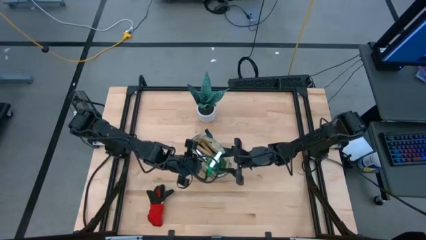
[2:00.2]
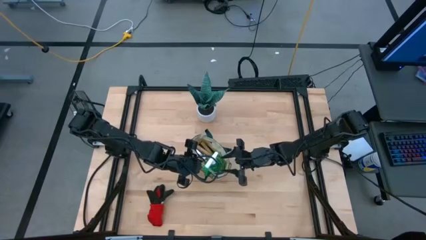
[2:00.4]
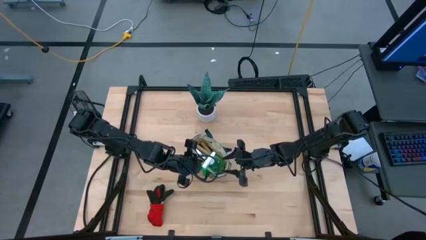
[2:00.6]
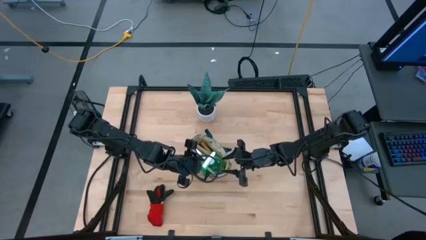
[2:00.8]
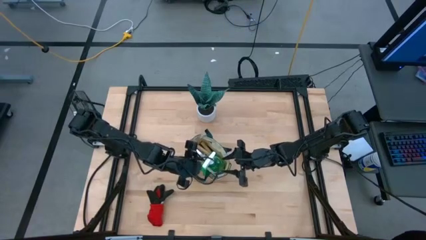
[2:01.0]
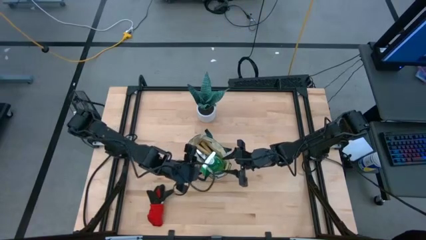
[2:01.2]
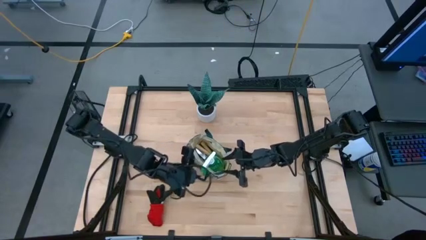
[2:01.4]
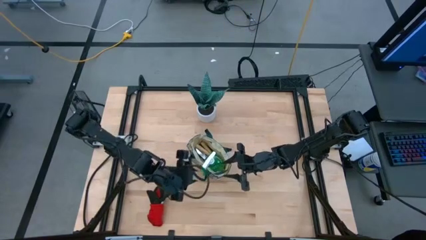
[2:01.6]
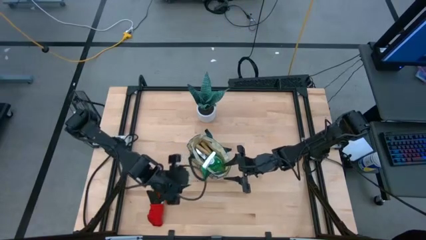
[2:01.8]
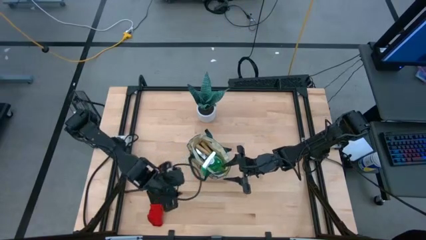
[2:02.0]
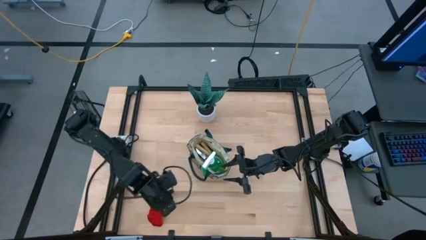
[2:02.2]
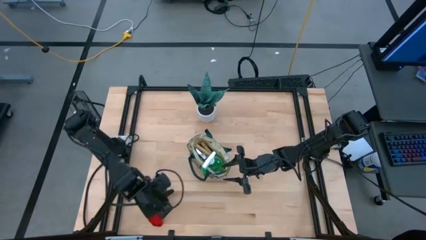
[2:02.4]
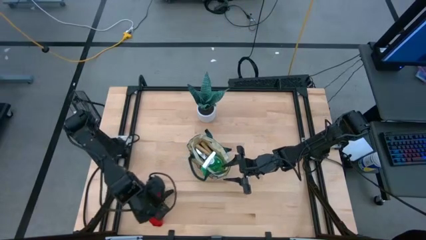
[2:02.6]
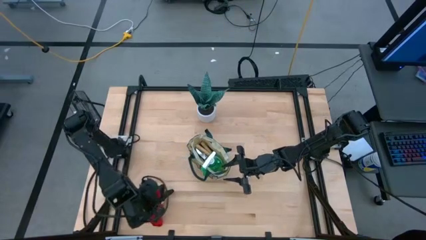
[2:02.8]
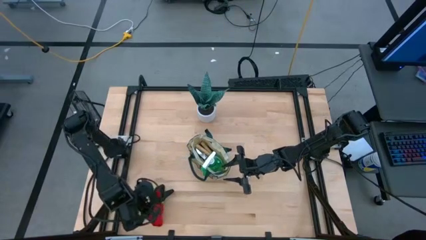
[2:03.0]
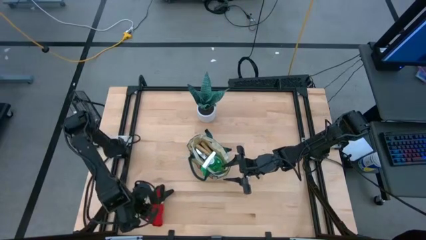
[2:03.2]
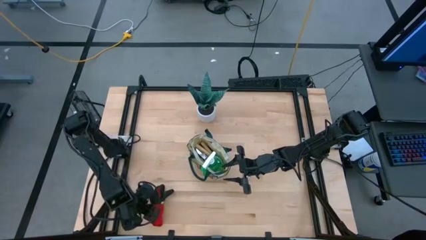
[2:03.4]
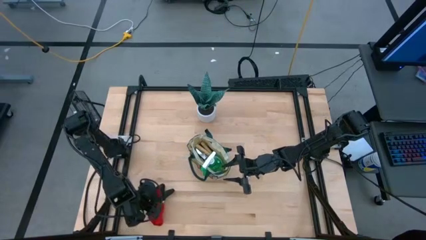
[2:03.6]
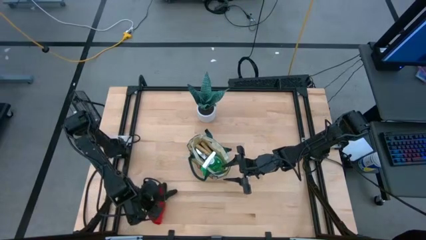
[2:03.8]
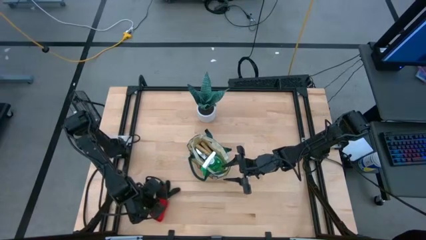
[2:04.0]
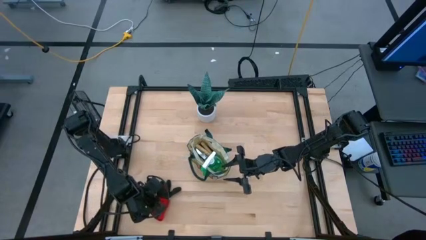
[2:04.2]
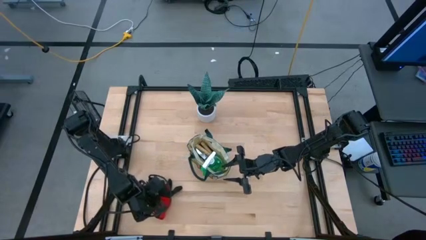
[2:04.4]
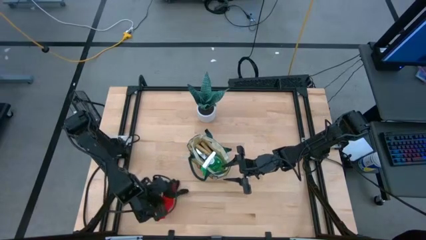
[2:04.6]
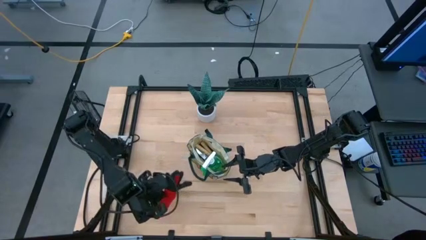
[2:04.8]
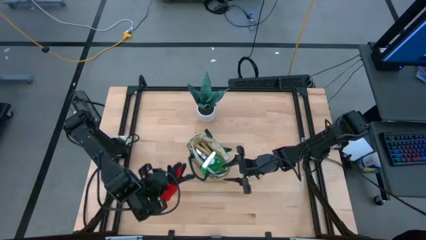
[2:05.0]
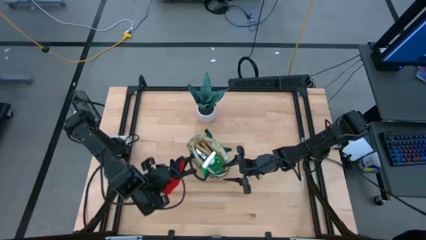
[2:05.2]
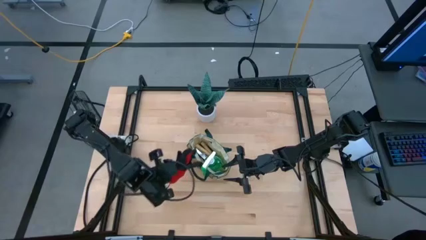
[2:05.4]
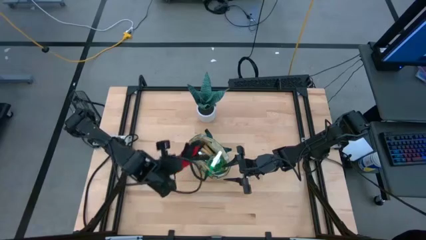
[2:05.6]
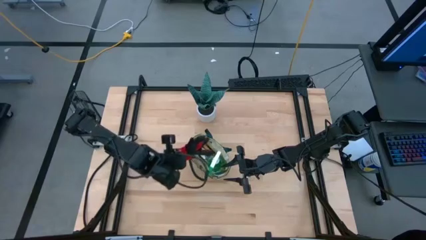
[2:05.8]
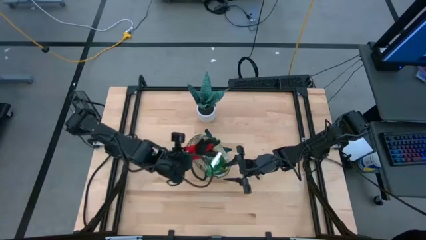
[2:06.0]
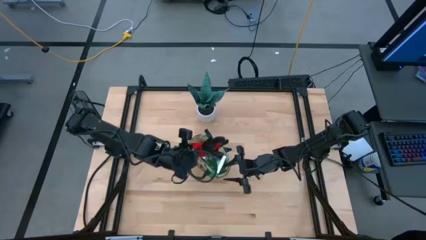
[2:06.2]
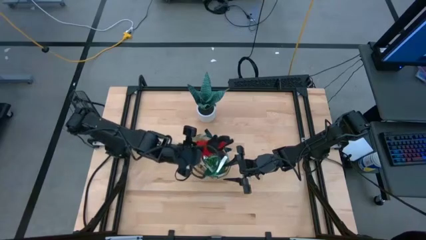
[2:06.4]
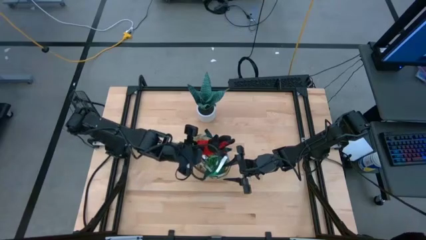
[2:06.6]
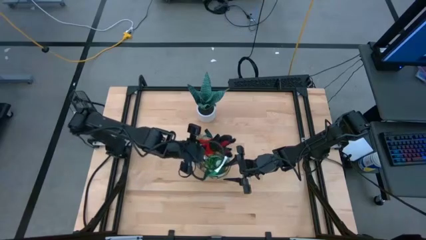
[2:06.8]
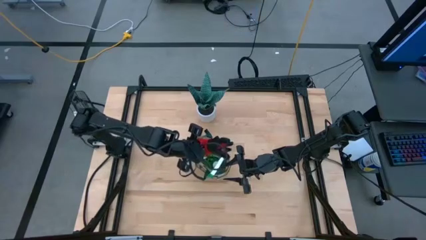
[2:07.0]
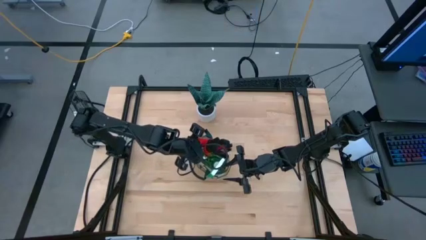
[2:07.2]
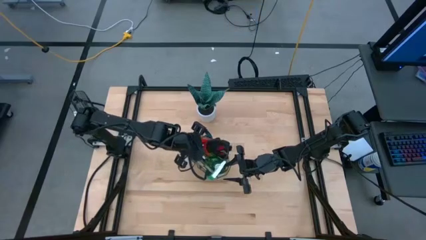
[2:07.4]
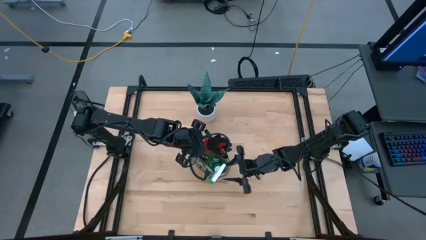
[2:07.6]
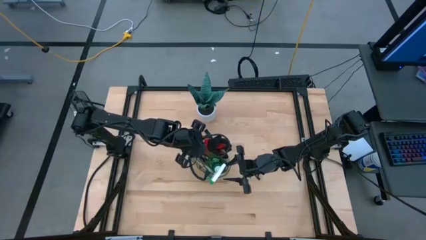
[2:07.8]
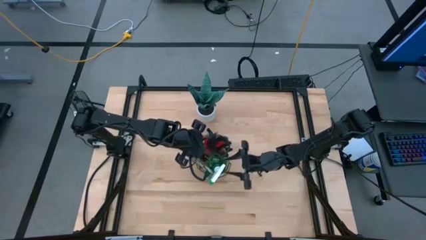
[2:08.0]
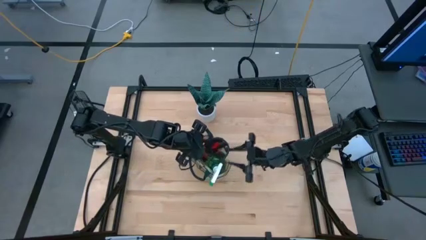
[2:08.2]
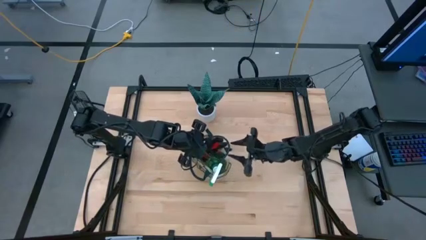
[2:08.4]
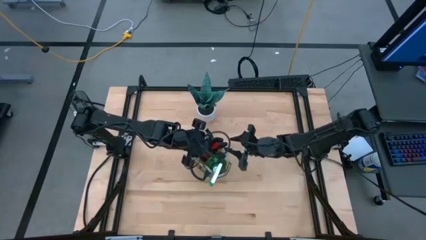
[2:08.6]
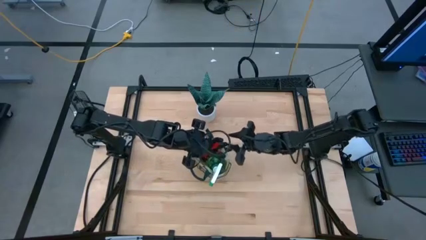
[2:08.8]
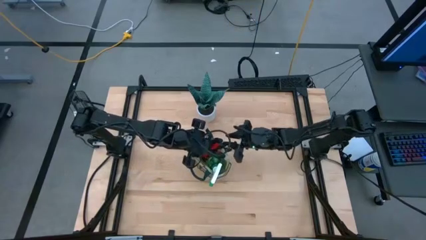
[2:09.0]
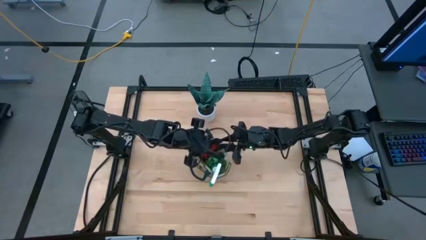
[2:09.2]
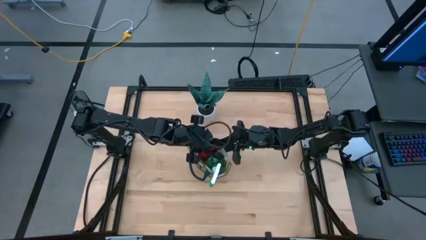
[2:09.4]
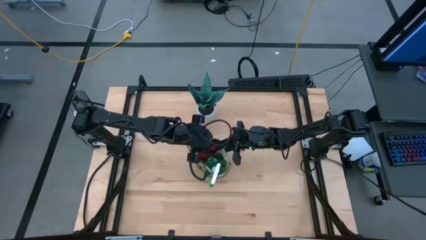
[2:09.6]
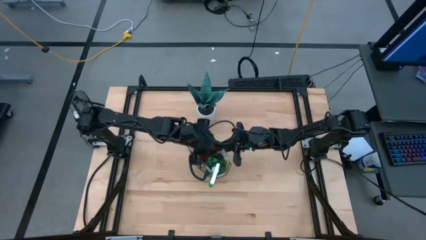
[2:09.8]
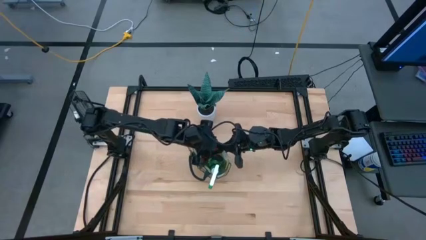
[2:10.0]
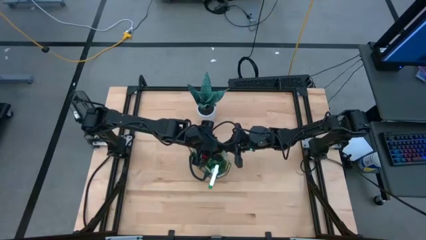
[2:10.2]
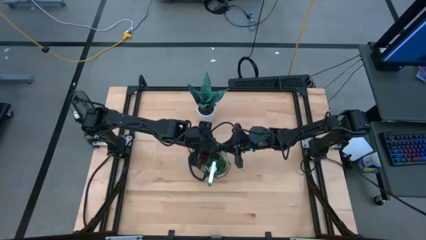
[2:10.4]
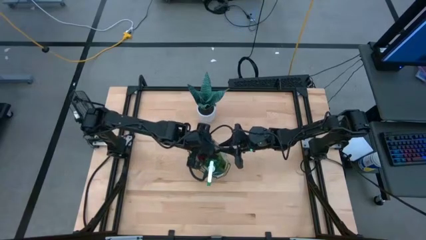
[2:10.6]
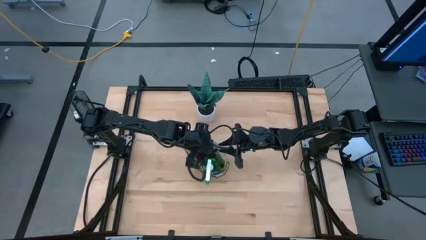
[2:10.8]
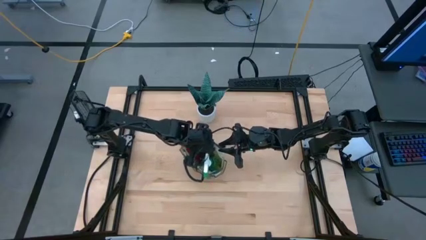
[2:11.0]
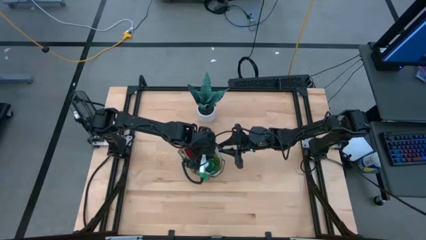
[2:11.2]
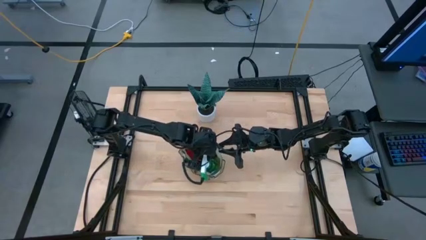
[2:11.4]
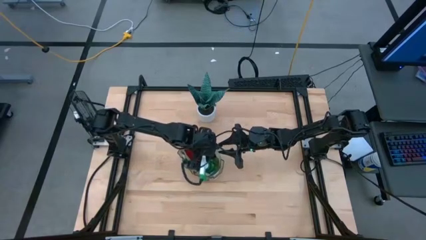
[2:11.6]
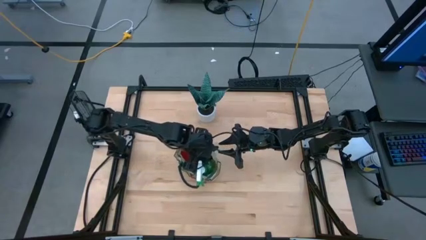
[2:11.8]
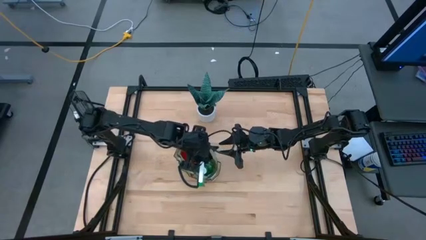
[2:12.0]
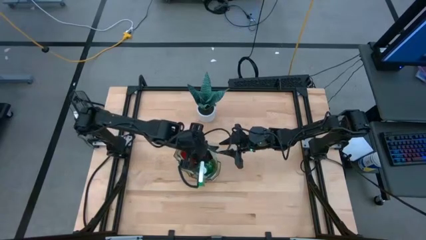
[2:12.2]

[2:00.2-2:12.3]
Task: Pick & Place Garden tools in Gardening bag
Put the gloves into the gardening bag
